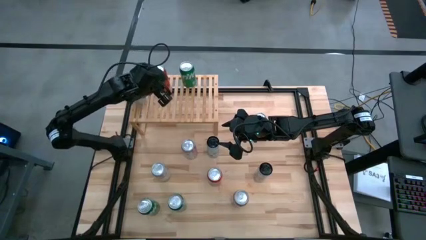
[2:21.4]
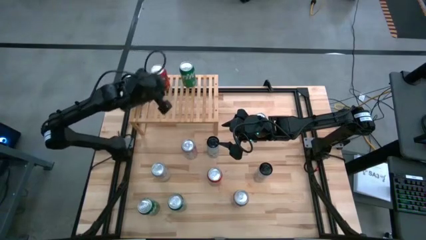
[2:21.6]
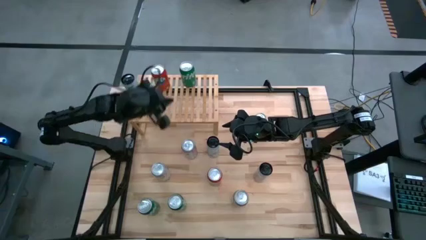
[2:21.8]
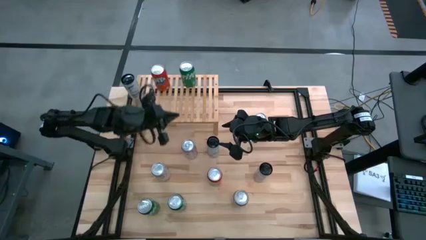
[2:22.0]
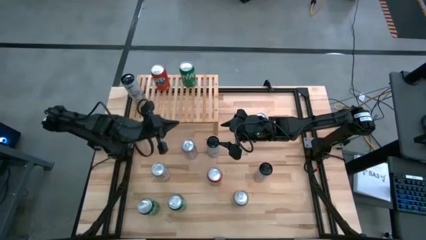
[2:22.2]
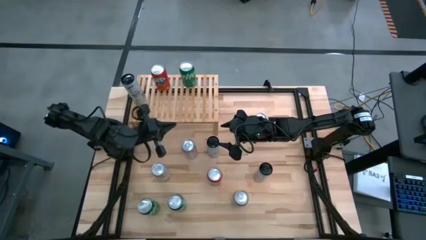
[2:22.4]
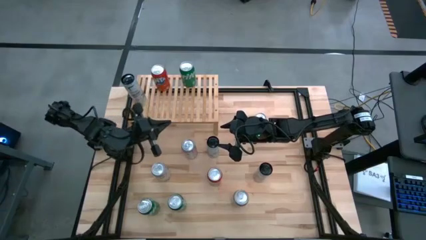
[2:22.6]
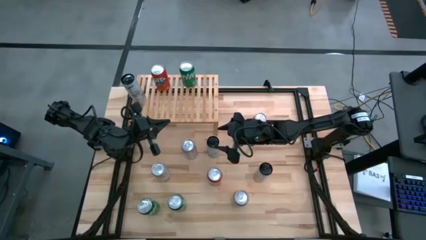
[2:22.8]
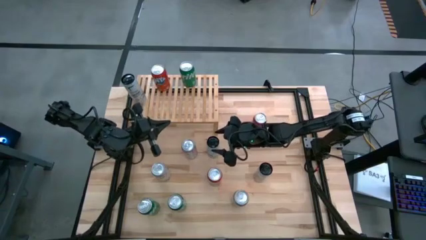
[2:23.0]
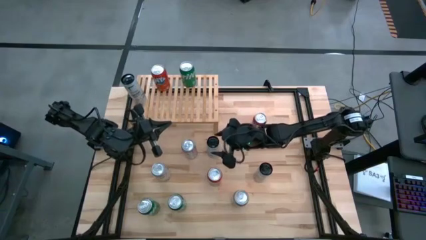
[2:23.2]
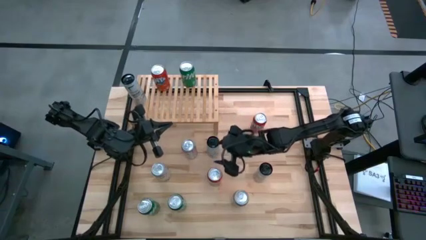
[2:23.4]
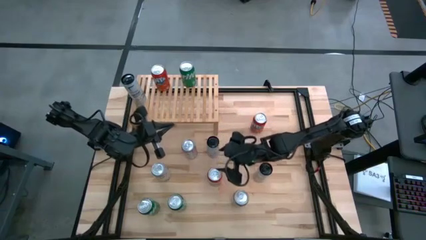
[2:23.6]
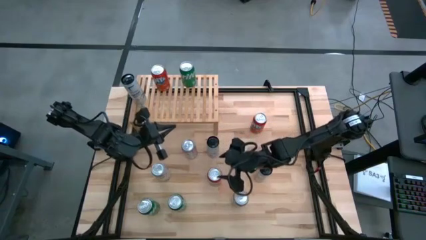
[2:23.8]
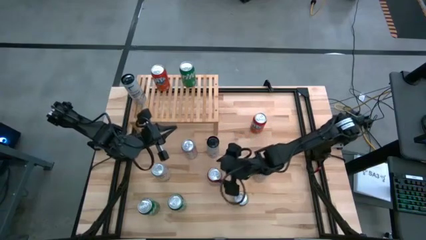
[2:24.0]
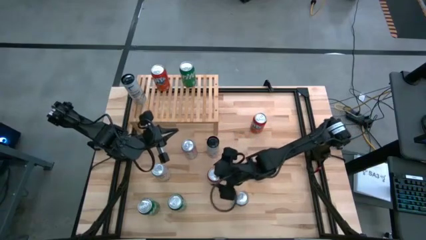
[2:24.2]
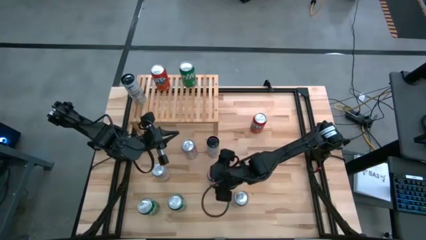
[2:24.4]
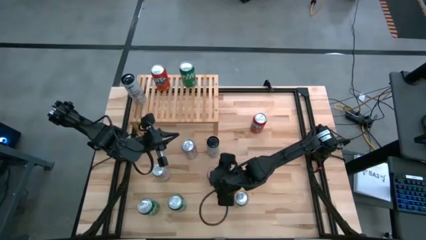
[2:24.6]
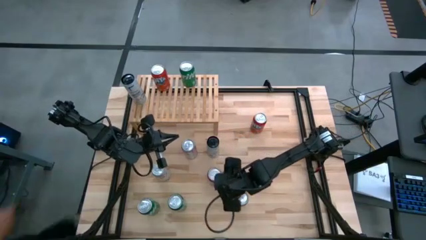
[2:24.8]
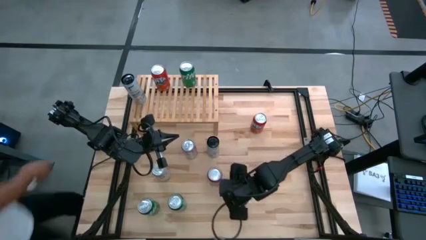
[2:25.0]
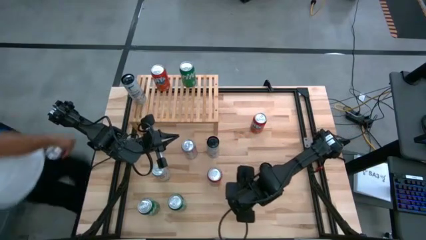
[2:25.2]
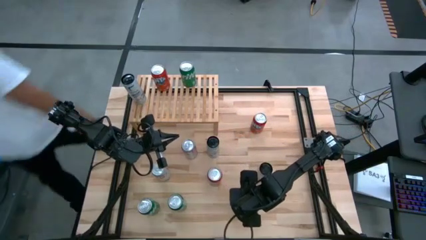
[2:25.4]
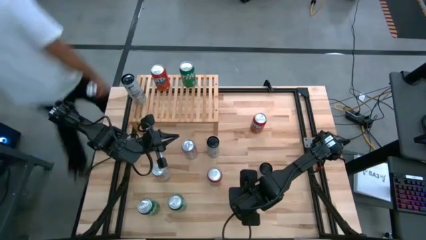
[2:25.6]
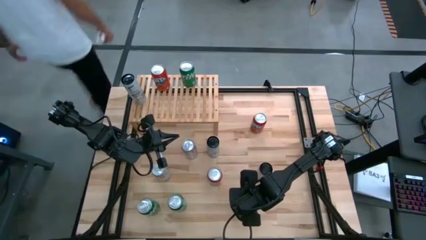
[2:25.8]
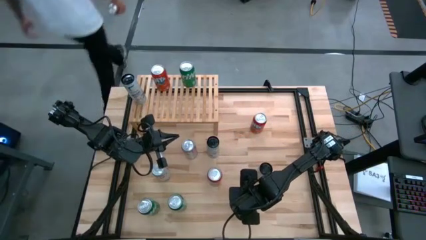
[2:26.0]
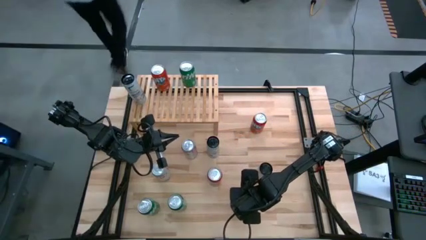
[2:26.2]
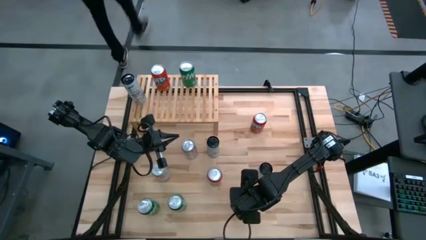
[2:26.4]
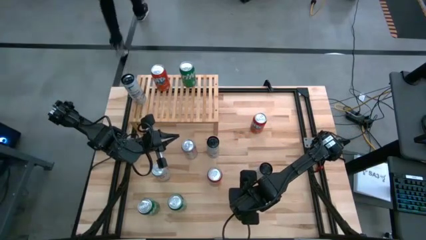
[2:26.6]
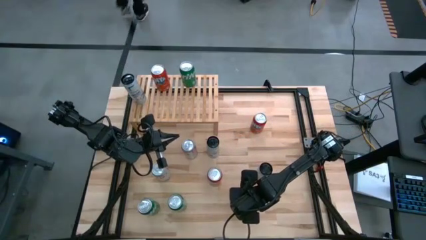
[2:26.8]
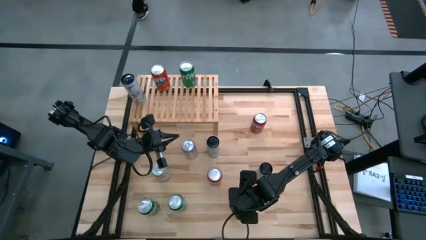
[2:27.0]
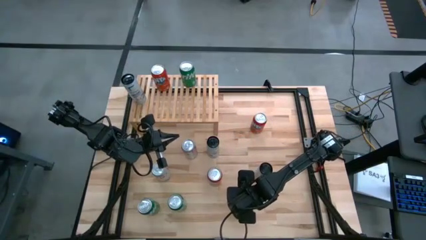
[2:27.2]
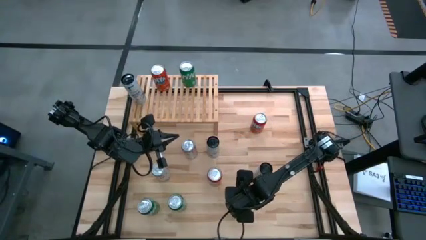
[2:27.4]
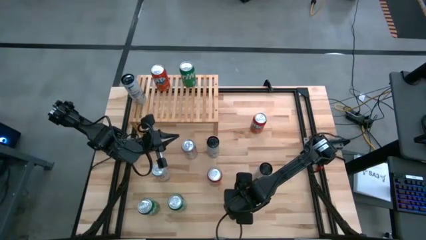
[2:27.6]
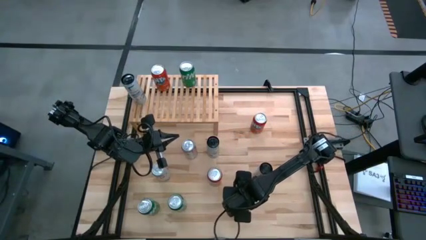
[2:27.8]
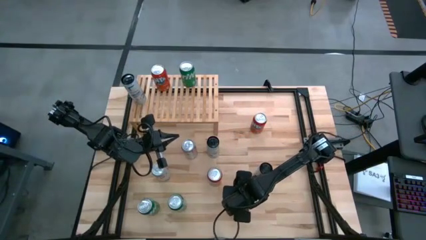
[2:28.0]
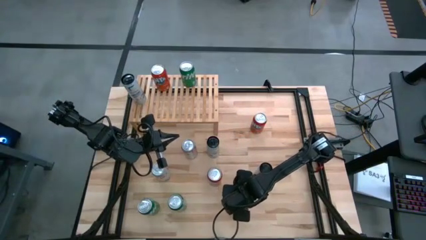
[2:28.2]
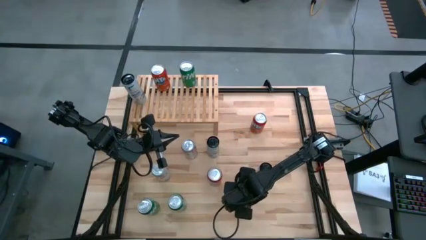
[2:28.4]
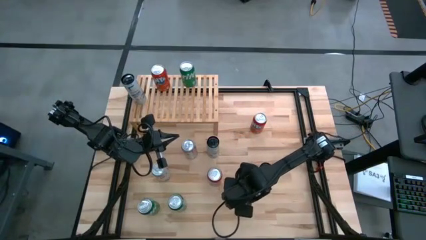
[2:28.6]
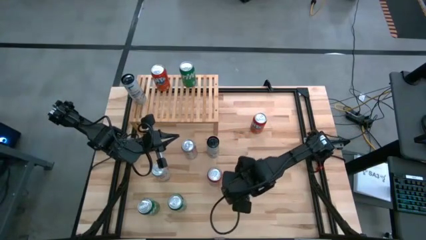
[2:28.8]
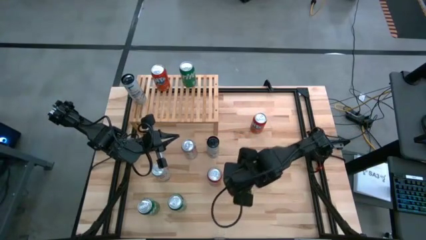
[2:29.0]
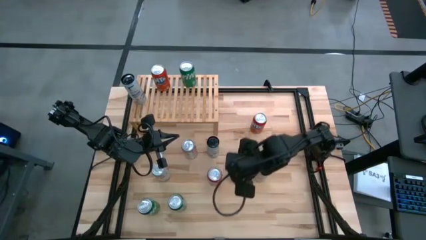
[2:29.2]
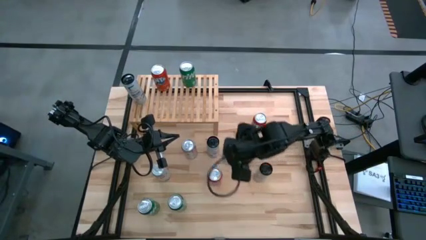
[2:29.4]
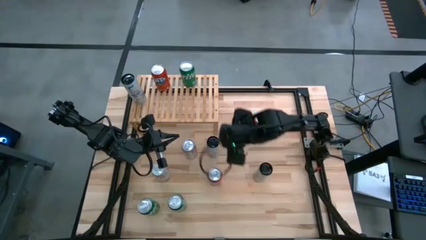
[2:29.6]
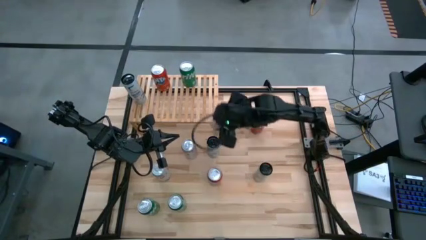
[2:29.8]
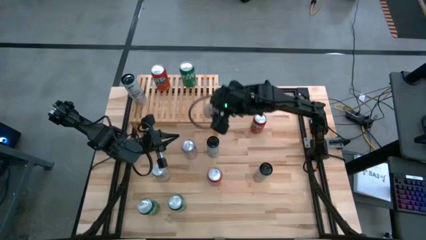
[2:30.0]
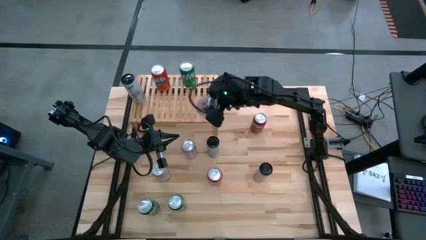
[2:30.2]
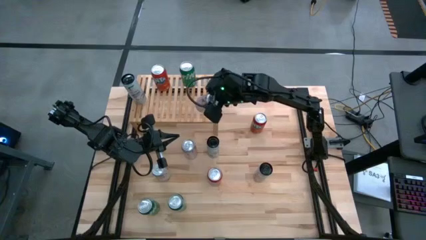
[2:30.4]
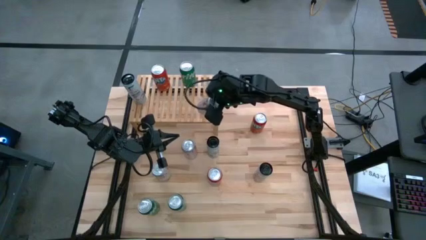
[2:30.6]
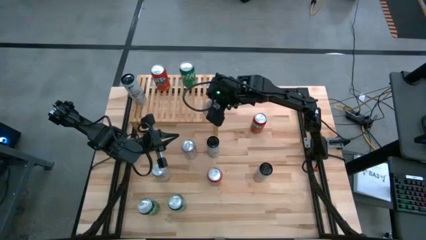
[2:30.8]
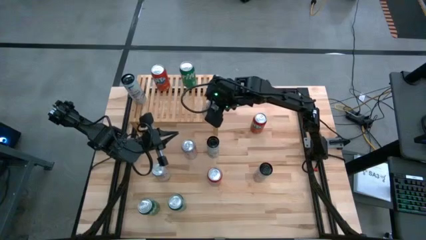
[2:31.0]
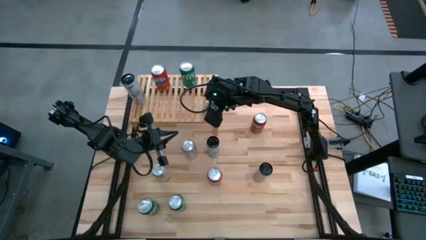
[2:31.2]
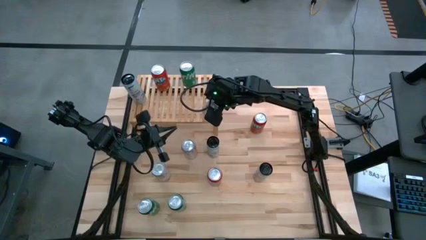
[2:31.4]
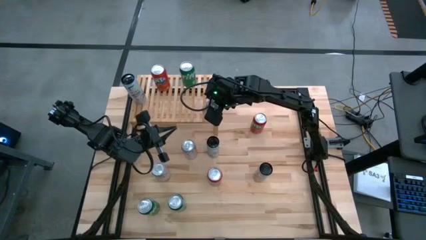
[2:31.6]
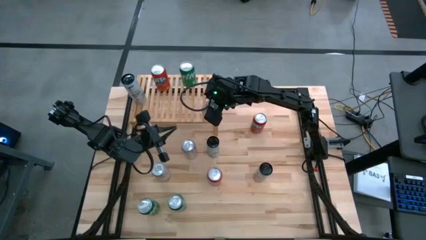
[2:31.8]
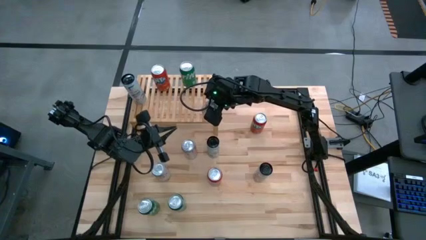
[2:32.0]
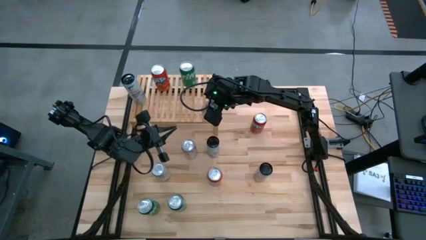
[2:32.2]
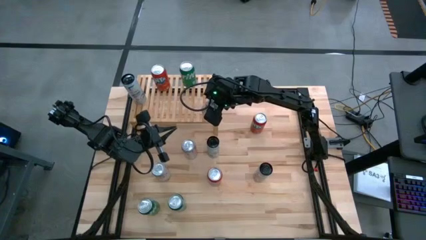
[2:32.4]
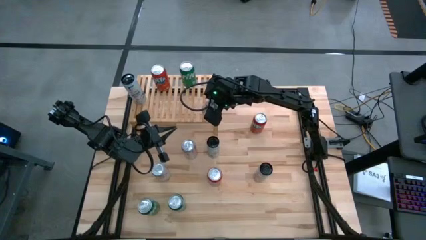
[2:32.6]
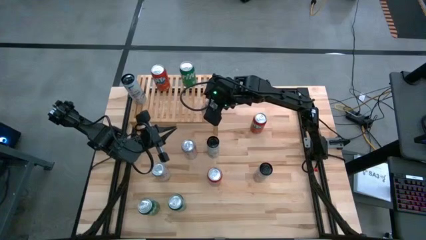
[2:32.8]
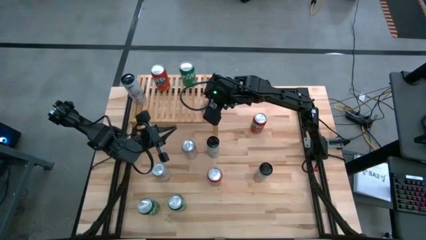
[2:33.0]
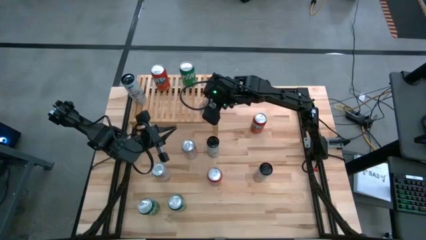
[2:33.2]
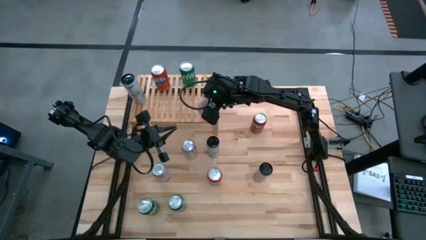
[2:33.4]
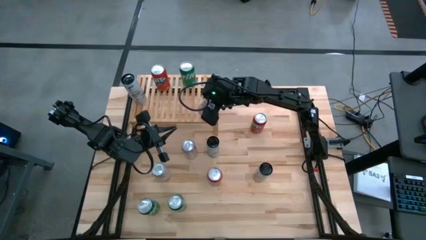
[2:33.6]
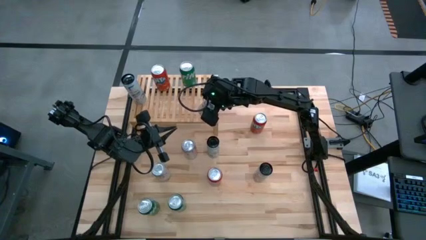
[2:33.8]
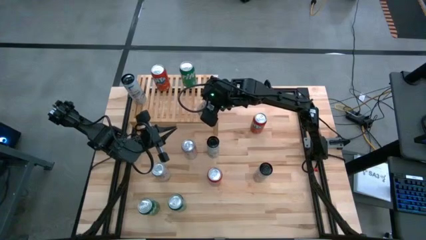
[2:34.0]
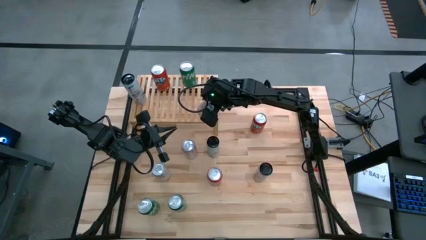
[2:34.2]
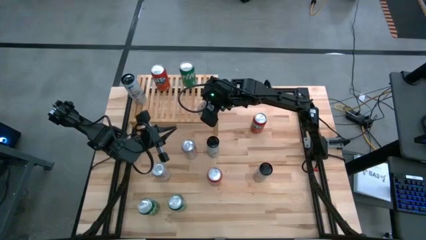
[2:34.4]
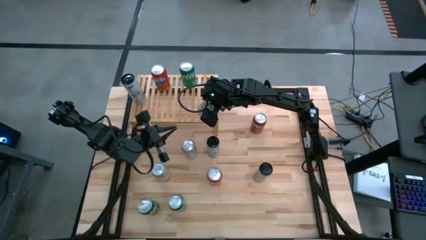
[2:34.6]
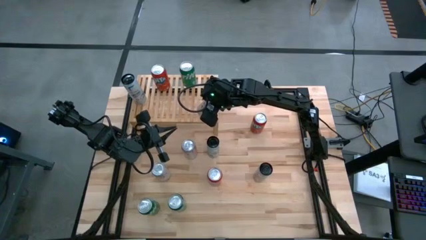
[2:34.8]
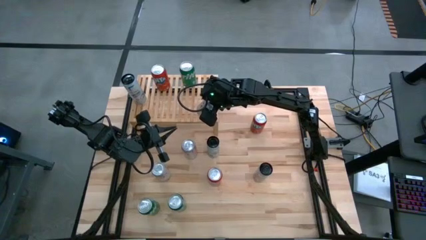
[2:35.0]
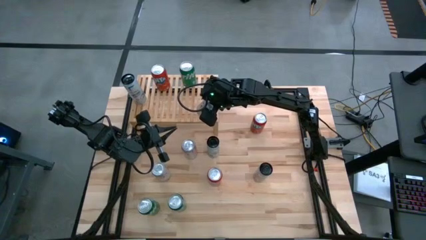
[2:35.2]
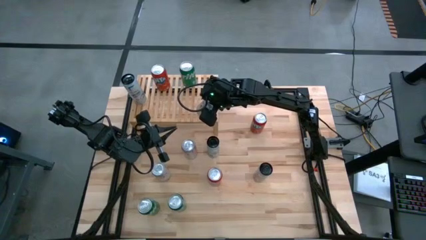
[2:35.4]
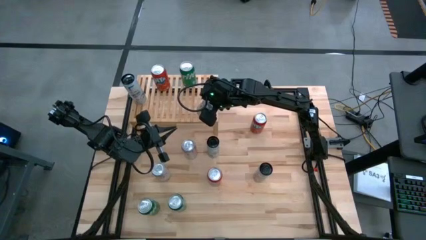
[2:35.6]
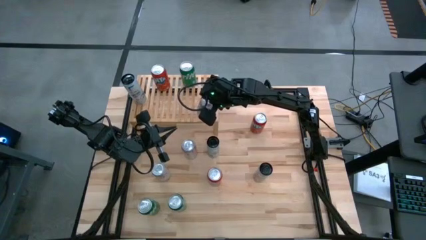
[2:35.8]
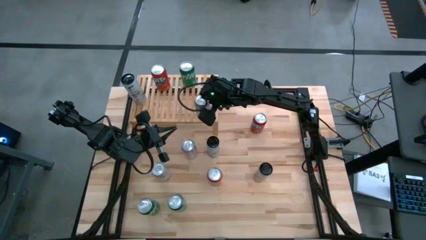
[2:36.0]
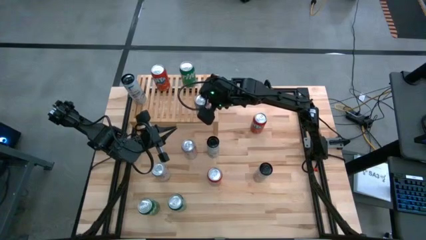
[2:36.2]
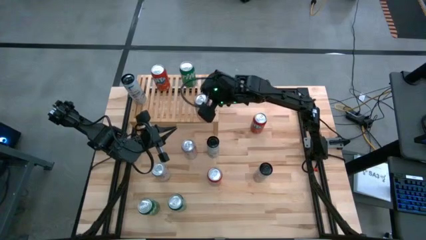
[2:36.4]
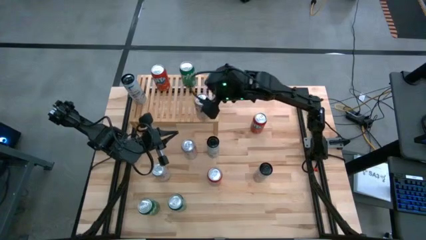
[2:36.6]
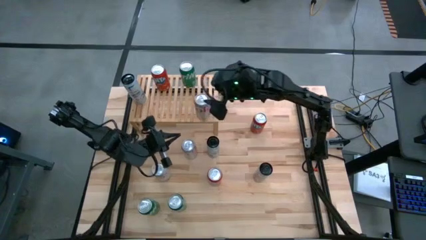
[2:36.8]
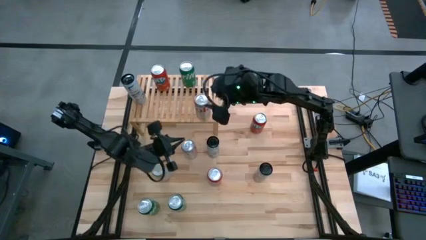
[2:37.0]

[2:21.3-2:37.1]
Task: Place canned beverage on shelf
Put the bottom red/silver soda can on the shelf
